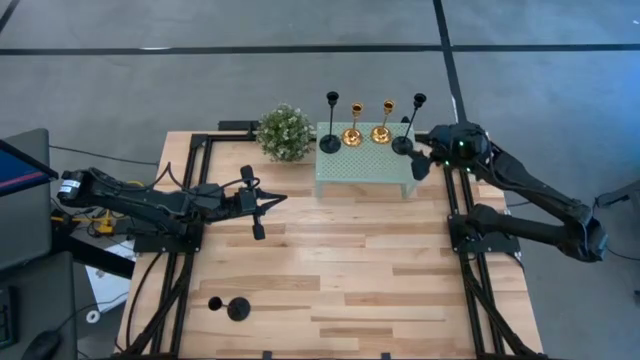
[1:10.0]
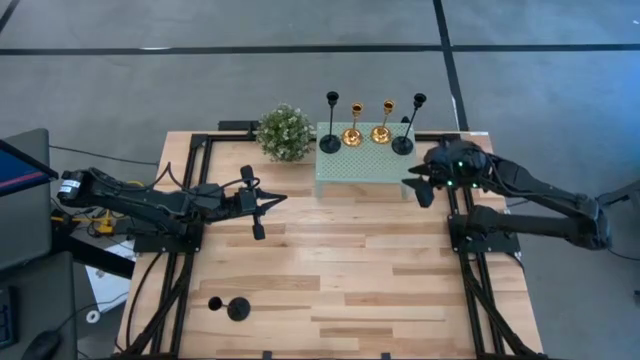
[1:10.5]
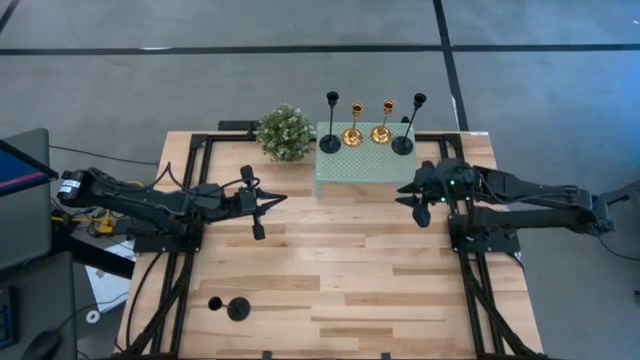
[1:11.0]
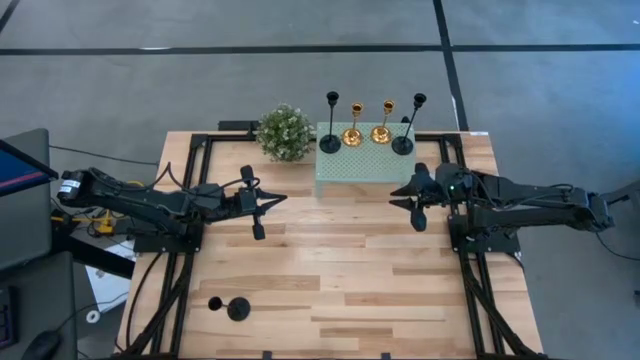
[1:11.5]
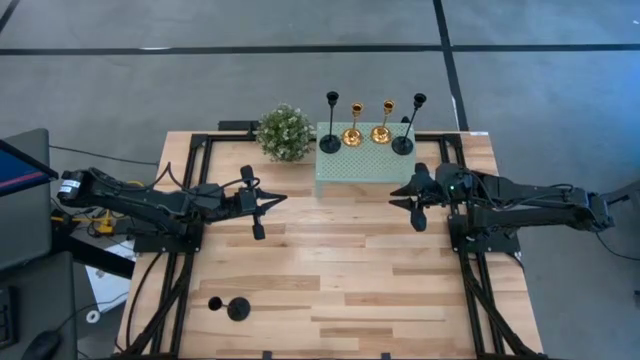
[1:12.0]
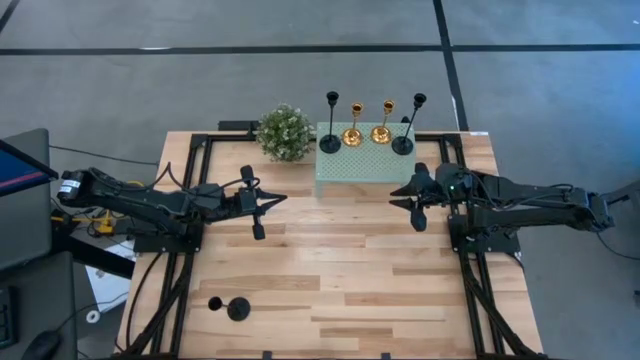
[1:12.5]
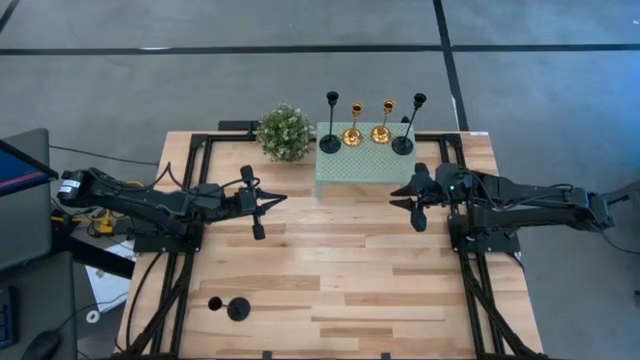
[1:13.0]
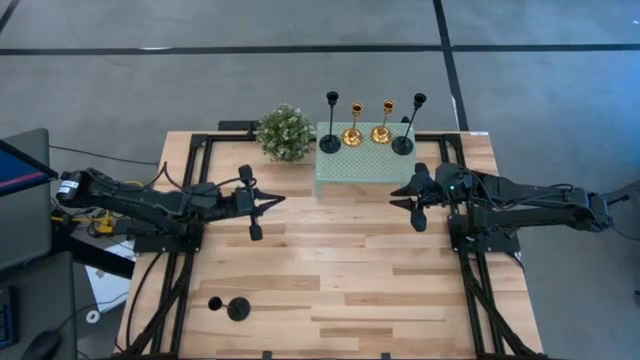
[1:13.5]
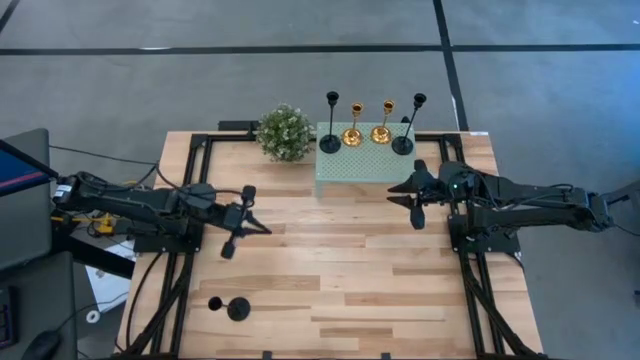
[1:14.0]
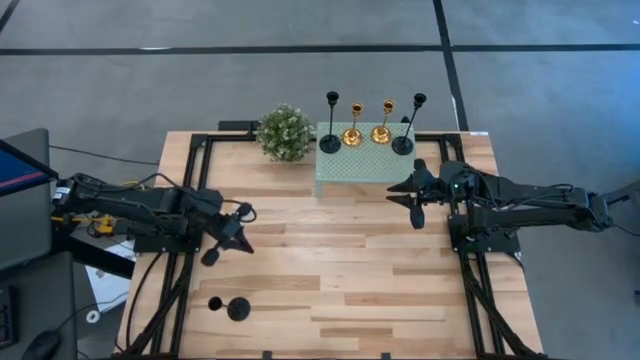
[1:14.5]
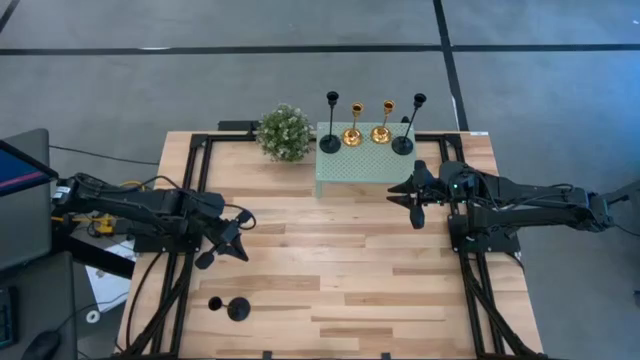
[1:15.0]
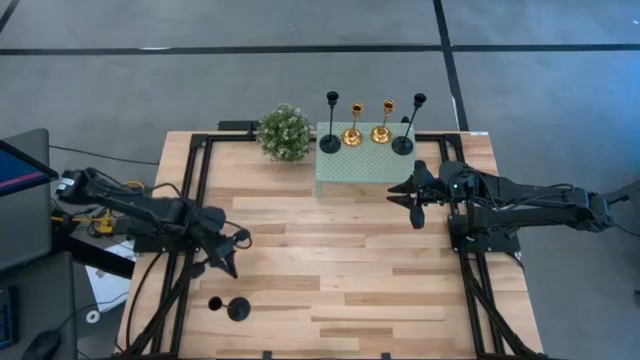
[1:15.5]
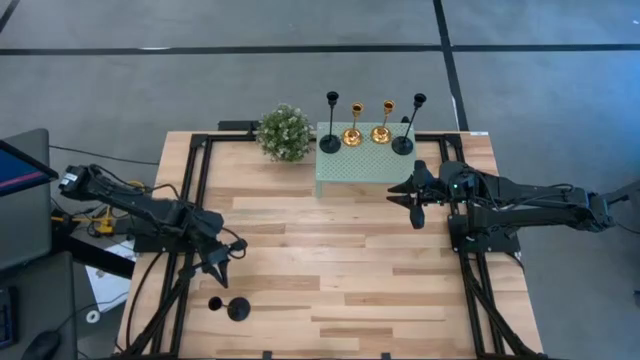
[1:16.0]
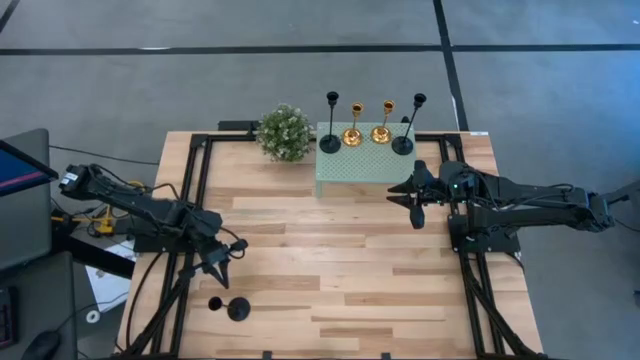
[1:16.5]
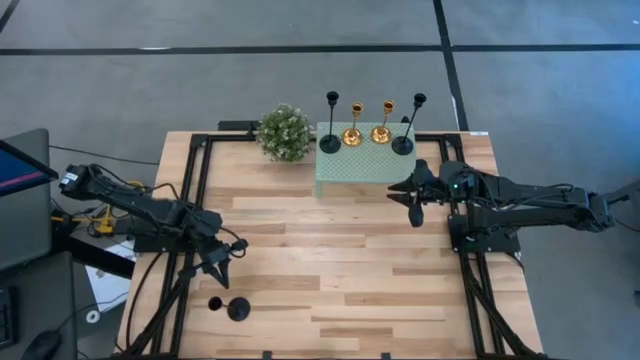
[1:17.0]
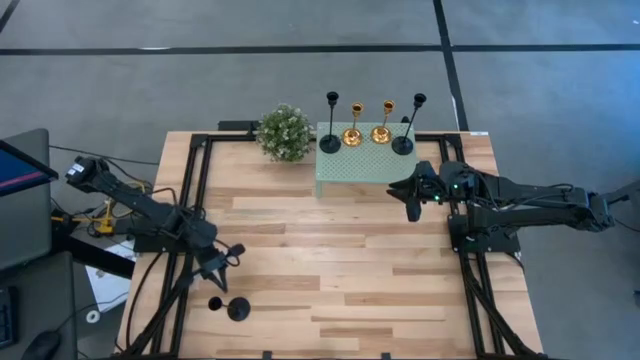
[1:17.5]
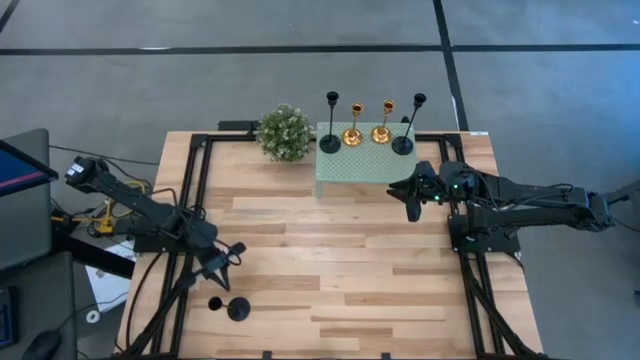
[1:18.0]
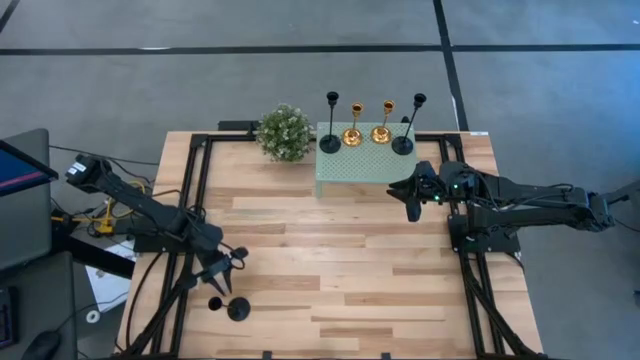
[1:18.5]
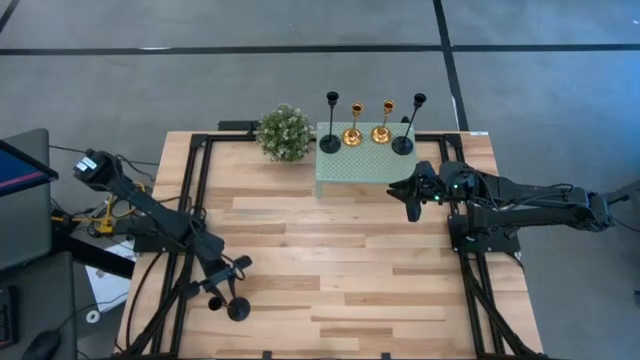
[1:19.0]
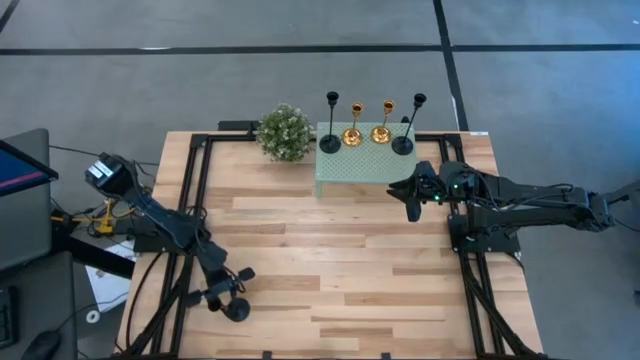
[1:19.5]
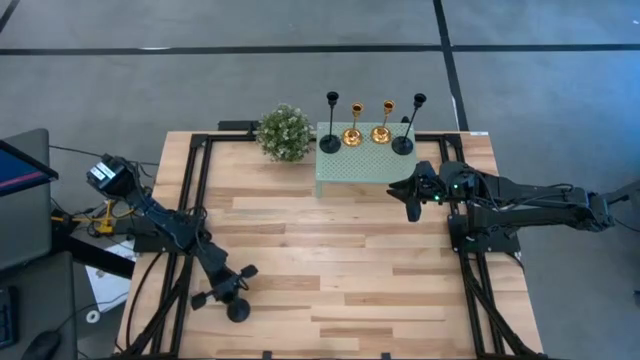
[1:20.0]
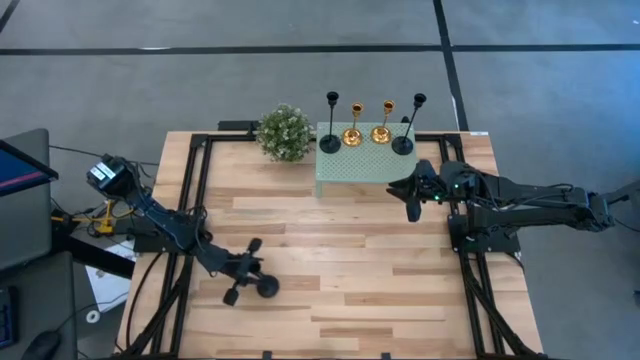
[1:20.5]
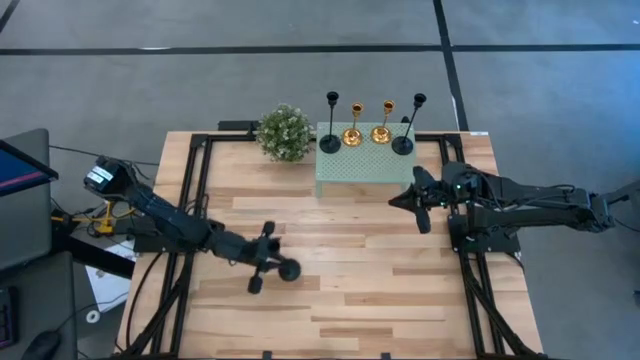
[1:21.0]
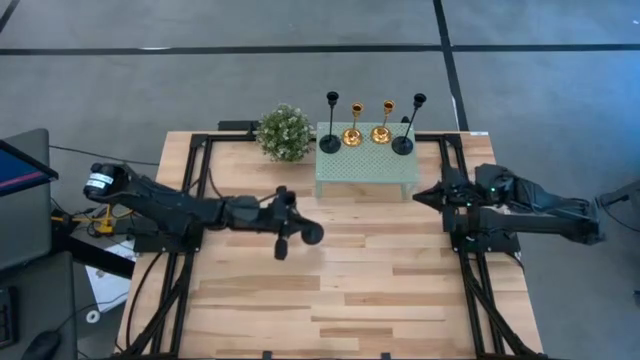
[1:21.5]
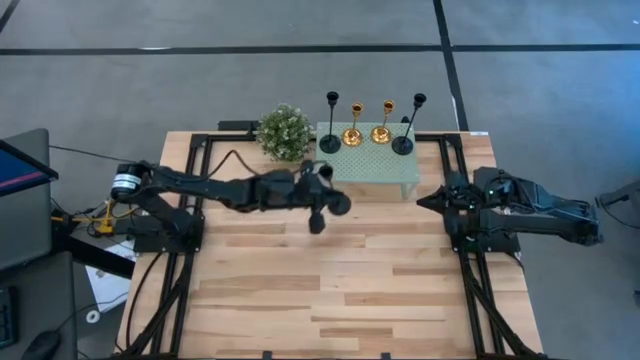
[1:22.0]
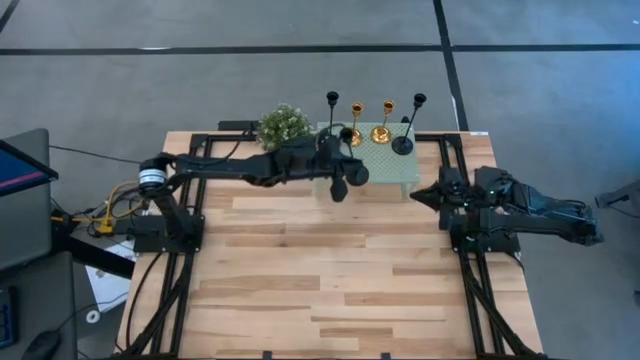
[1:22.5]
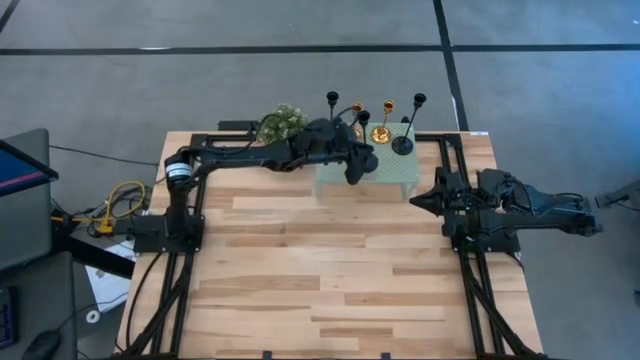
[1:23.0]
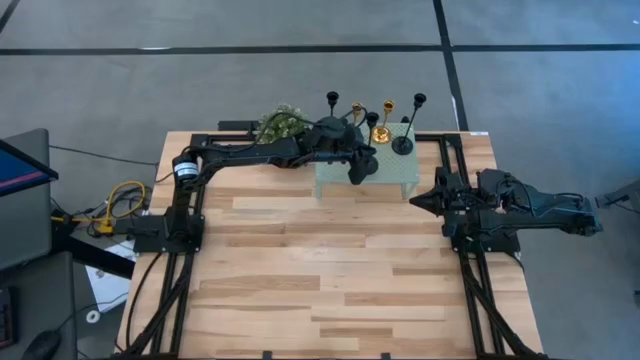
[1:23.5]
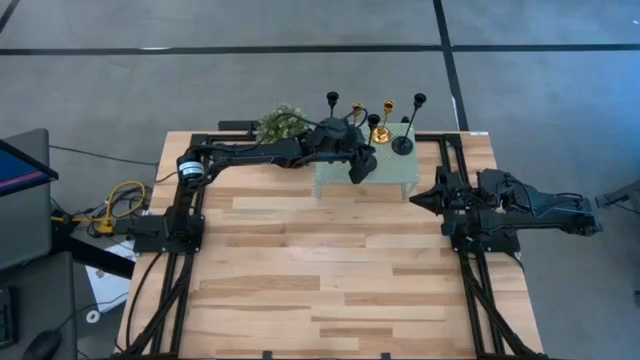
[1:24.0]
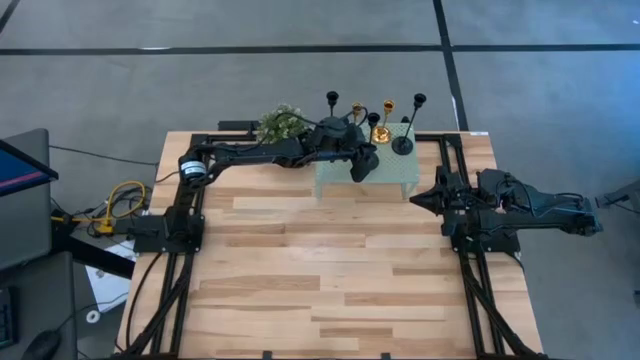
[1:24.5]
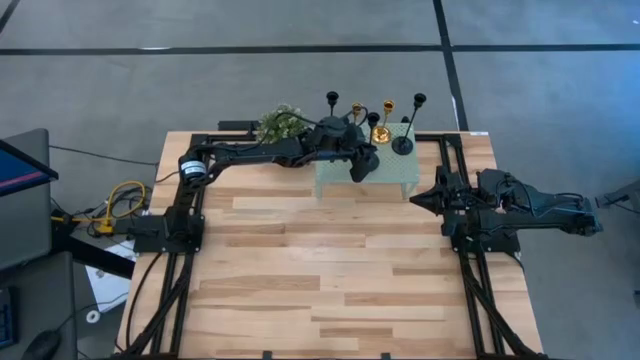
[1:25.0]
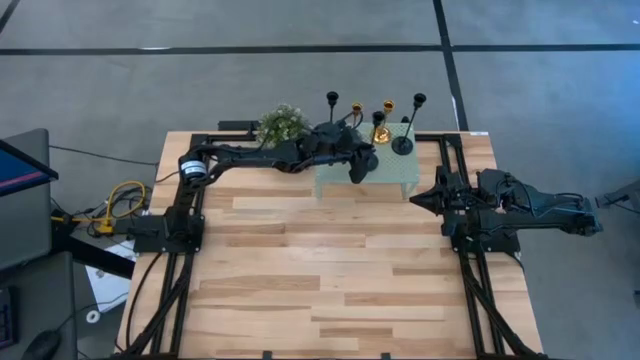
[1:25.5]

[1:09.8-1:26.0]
Task: Pick & Place candle stick holders
Put the black candle holder on the shelf

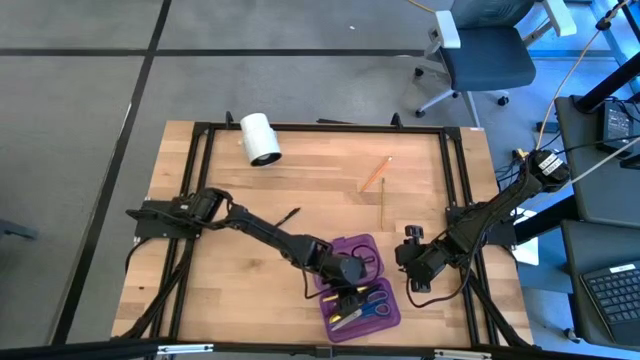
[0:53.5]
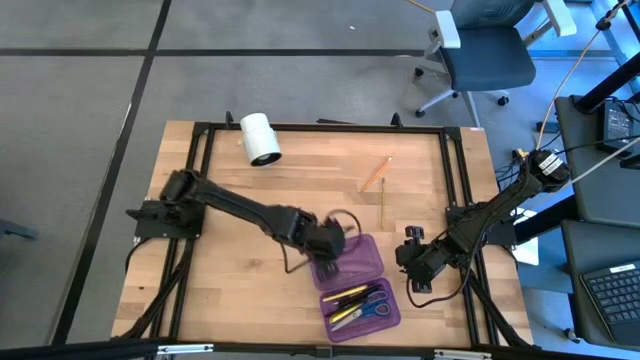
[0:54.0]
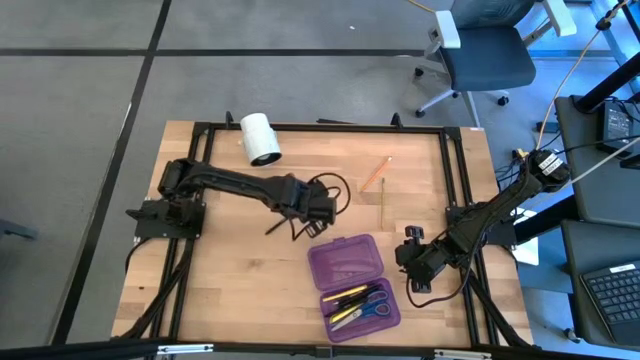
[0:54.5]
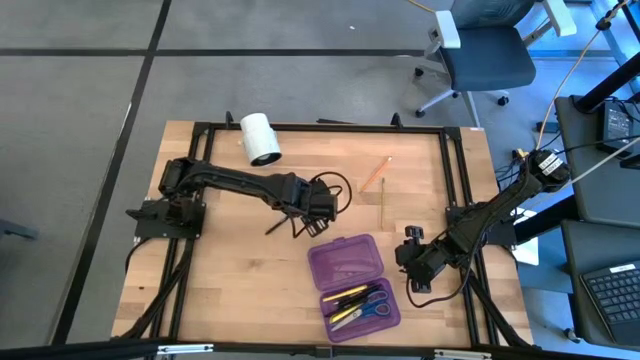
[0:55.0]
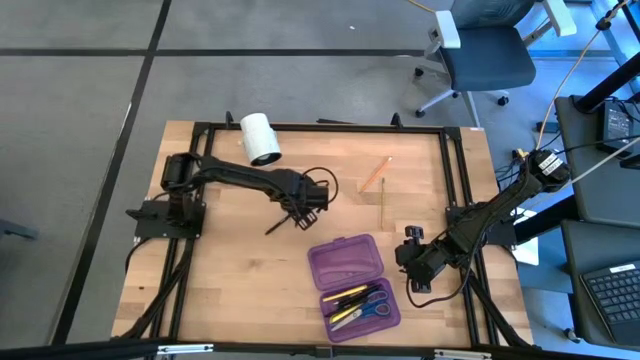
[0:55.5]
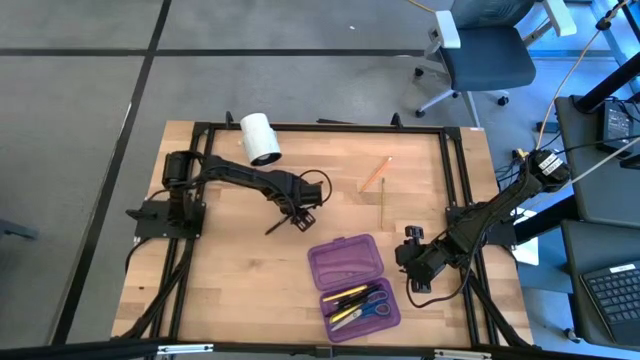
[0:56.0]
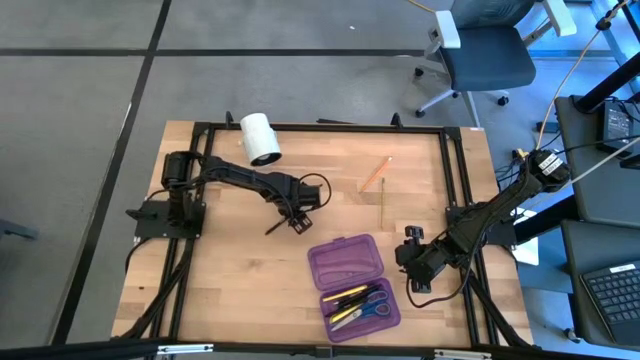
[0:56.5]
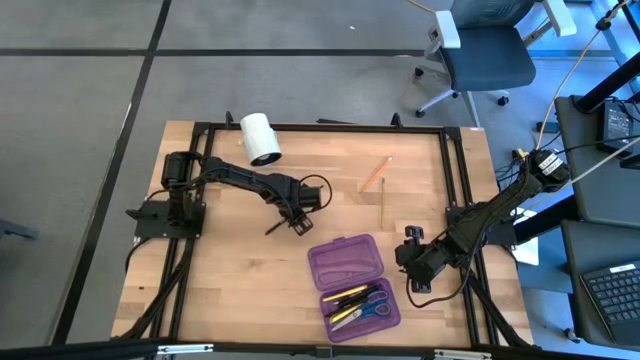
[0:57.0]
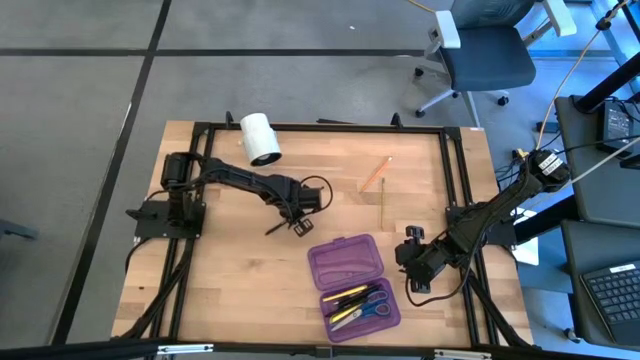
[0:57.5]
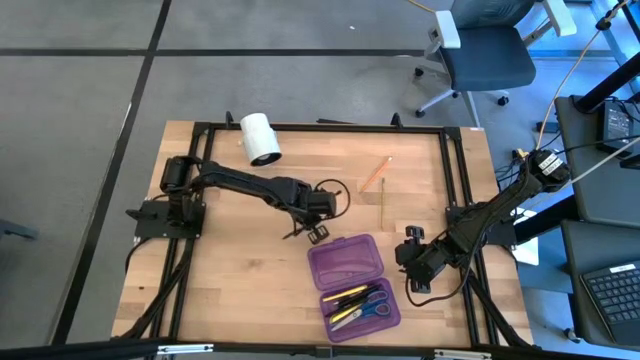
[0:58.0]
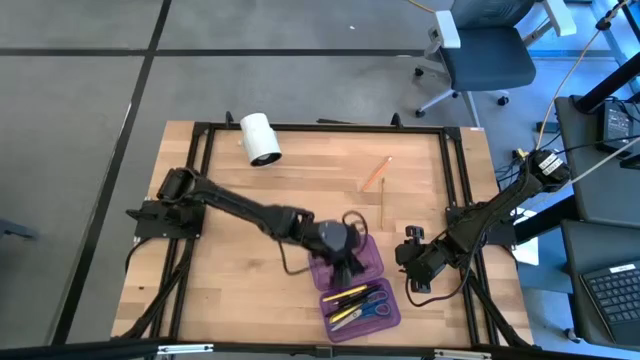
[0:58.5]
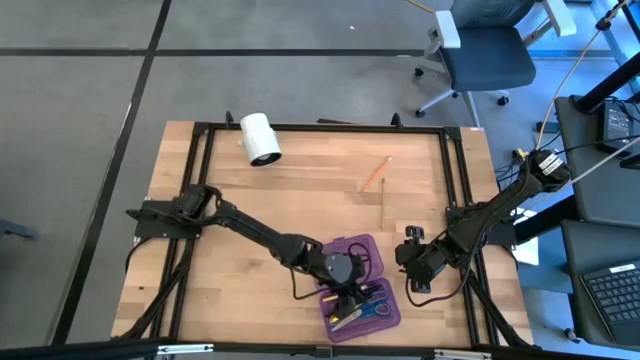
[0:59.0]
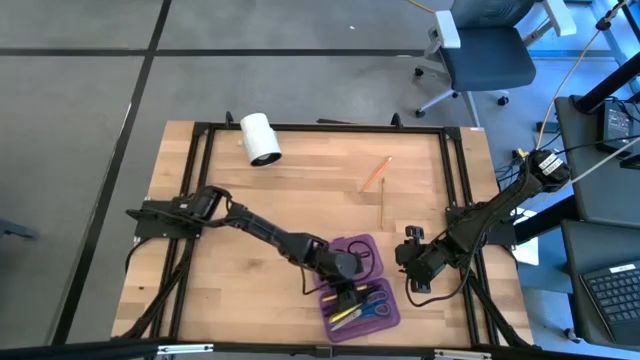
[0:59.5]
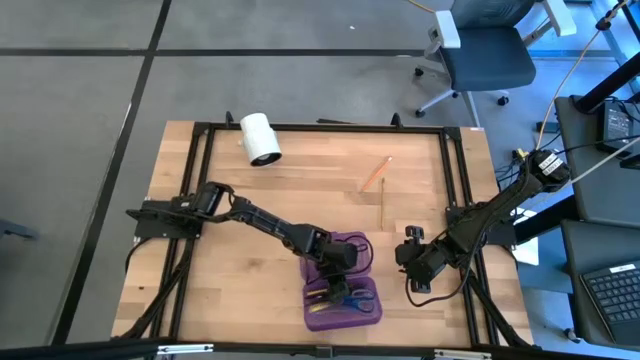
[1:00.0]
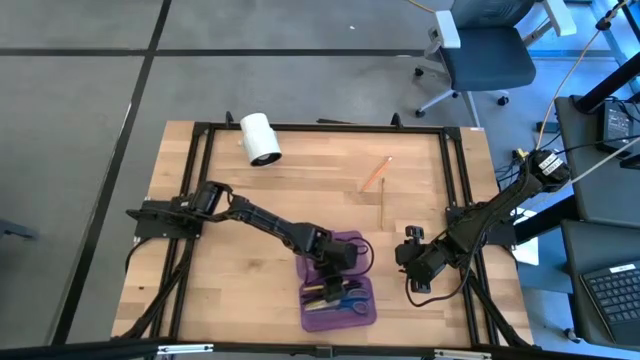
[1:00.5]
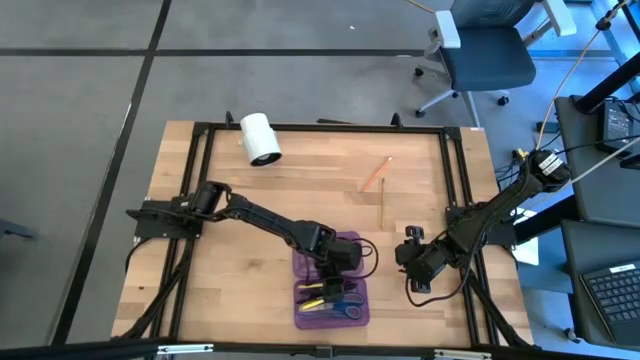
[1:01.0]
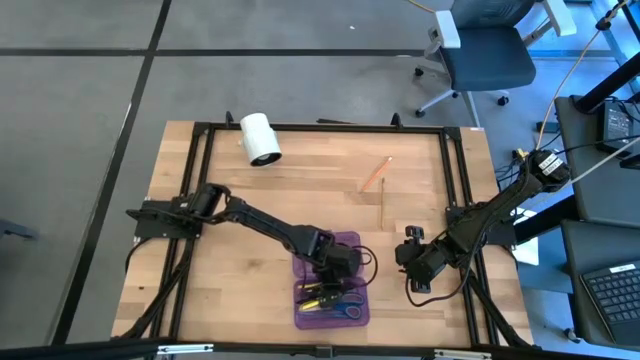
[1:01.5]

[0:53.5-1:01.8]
Task: Pick & place school supplies into a supply box
Put the black pen into the purple supply box
